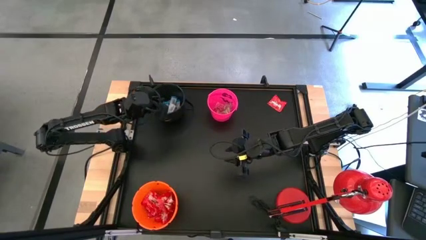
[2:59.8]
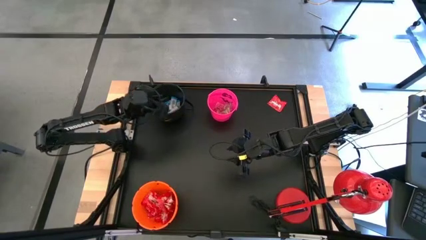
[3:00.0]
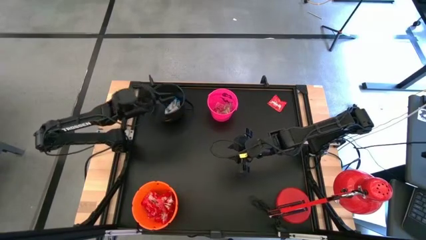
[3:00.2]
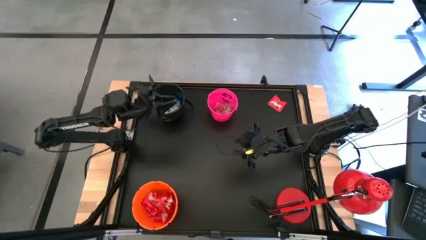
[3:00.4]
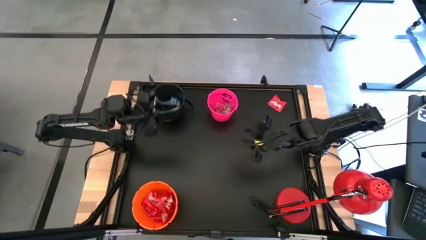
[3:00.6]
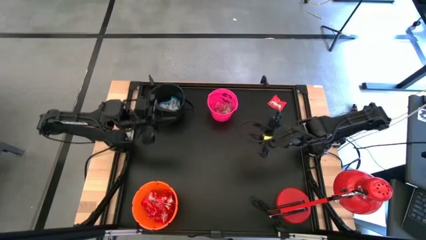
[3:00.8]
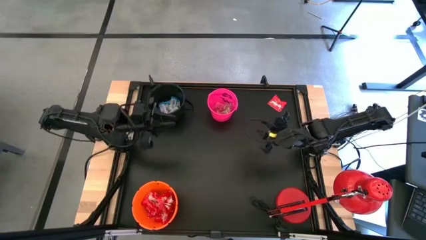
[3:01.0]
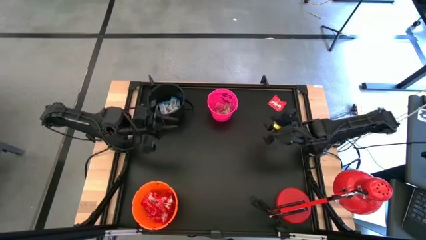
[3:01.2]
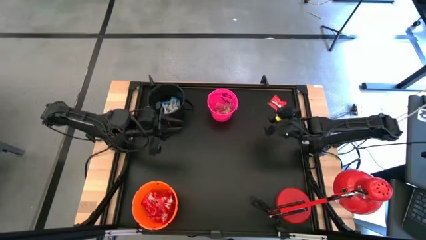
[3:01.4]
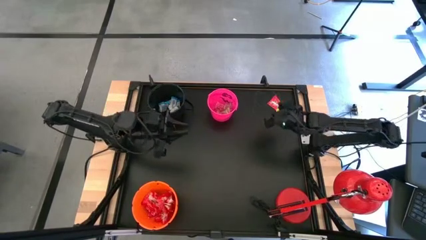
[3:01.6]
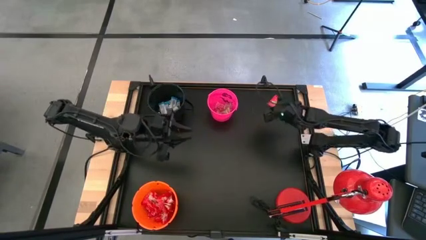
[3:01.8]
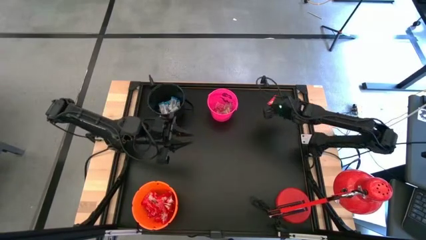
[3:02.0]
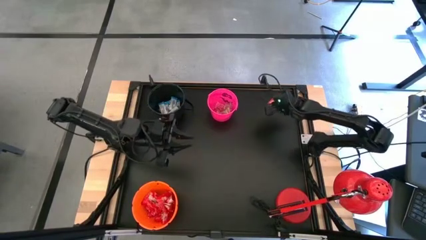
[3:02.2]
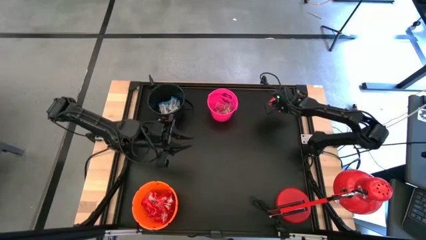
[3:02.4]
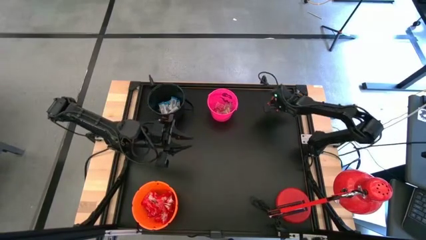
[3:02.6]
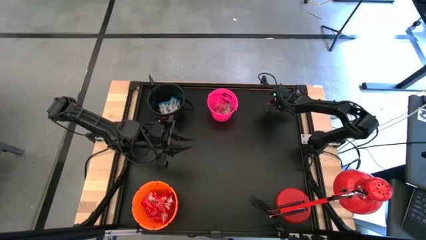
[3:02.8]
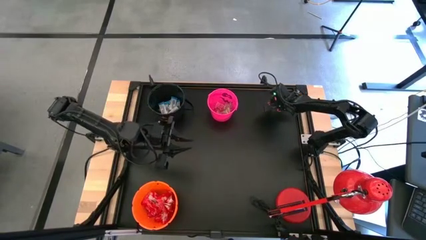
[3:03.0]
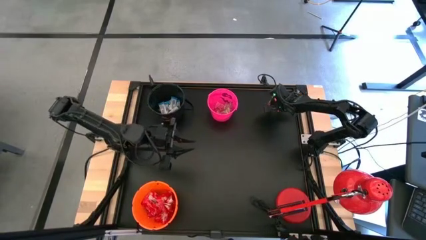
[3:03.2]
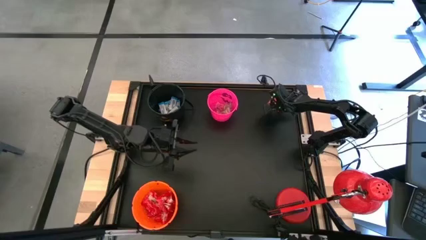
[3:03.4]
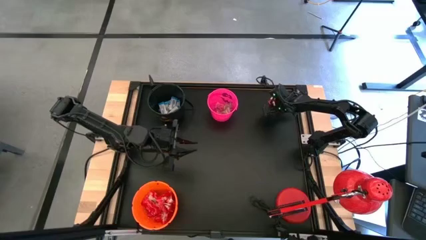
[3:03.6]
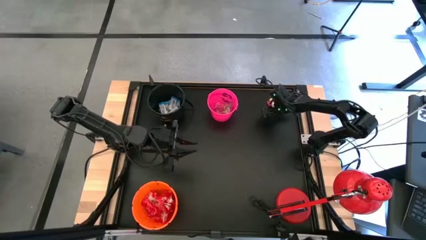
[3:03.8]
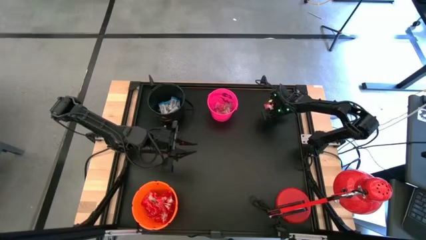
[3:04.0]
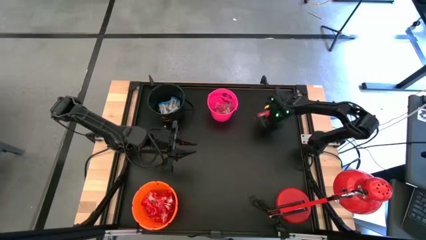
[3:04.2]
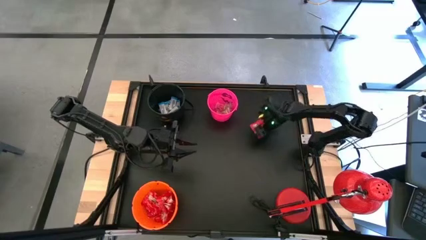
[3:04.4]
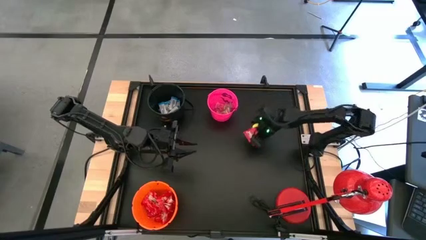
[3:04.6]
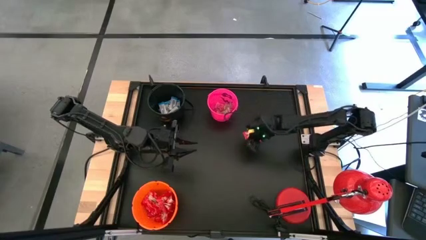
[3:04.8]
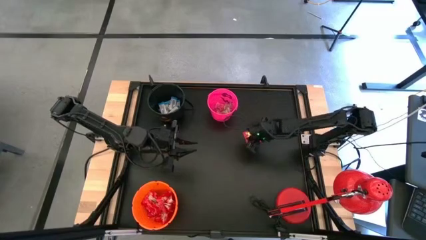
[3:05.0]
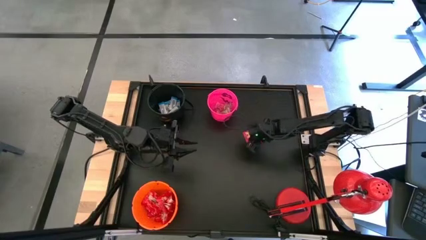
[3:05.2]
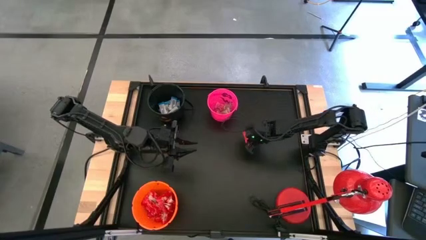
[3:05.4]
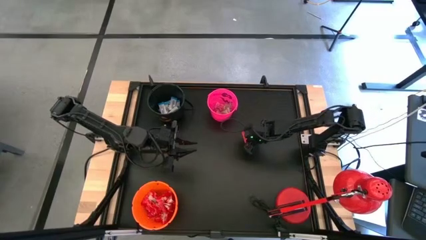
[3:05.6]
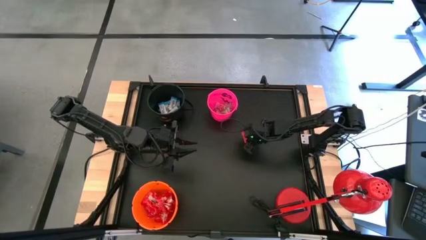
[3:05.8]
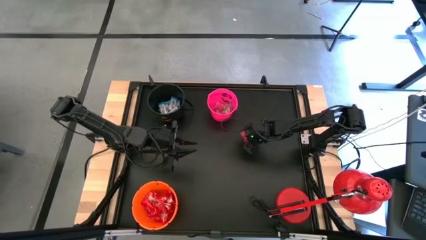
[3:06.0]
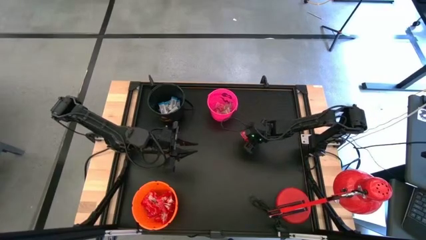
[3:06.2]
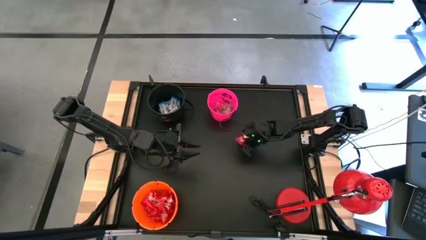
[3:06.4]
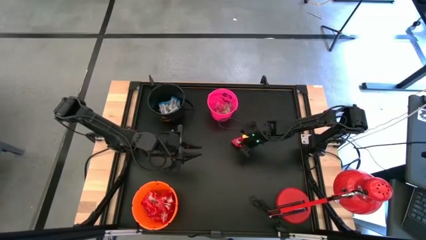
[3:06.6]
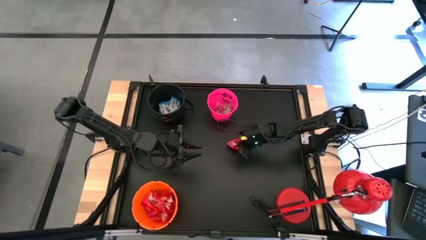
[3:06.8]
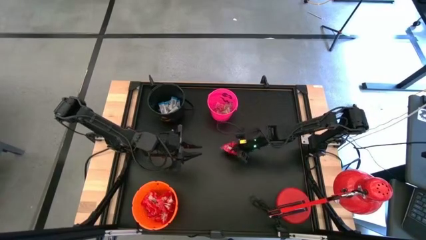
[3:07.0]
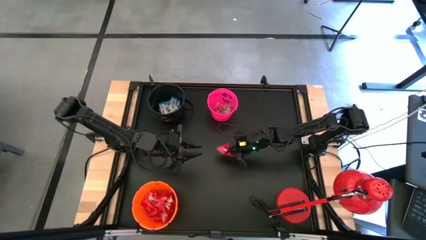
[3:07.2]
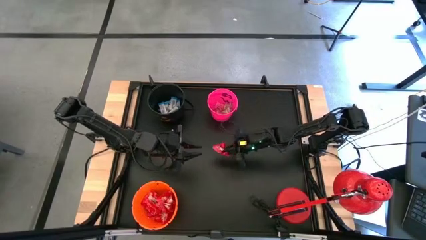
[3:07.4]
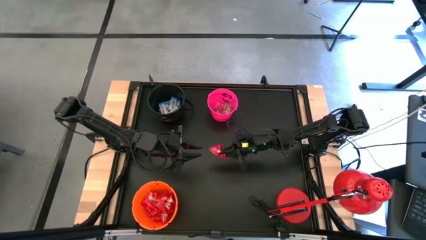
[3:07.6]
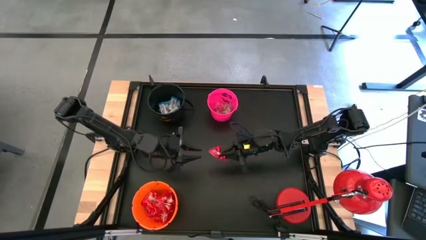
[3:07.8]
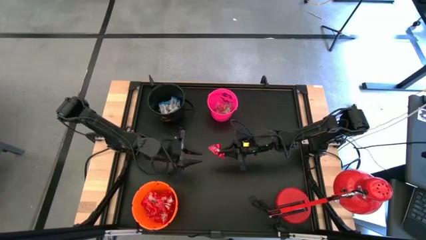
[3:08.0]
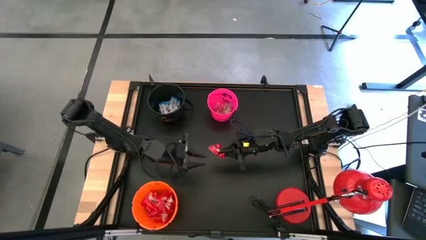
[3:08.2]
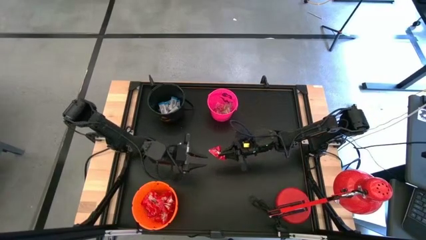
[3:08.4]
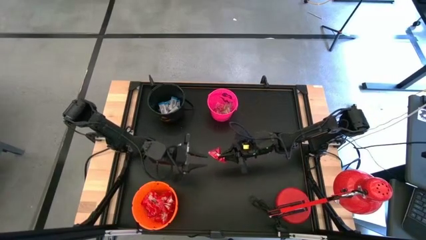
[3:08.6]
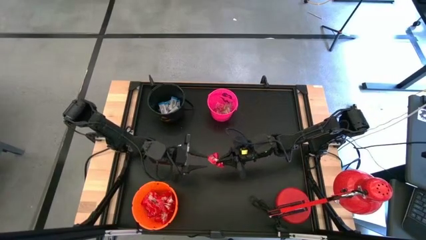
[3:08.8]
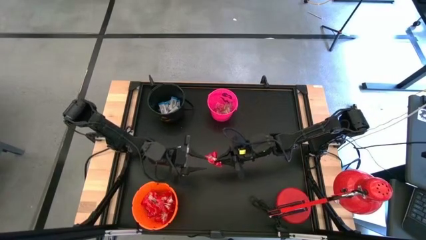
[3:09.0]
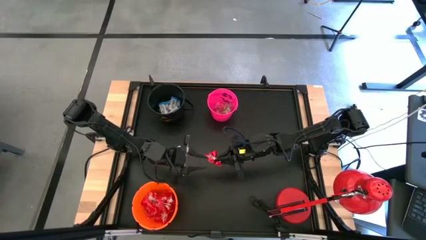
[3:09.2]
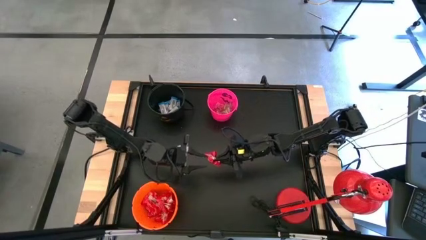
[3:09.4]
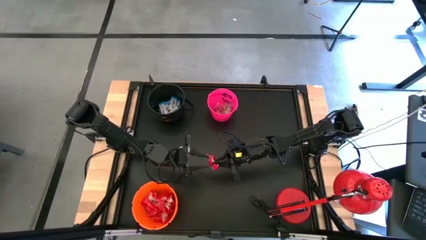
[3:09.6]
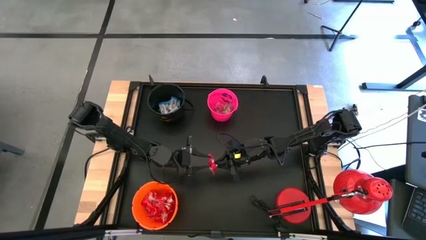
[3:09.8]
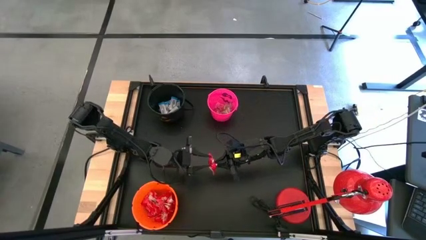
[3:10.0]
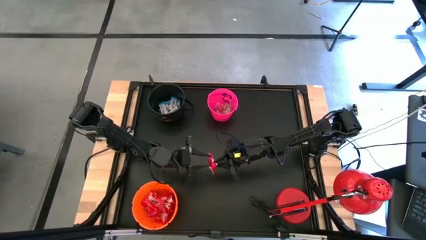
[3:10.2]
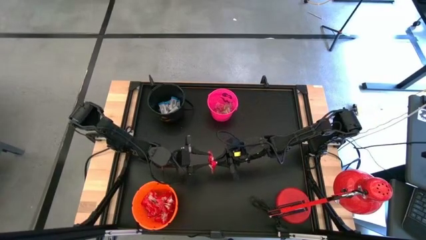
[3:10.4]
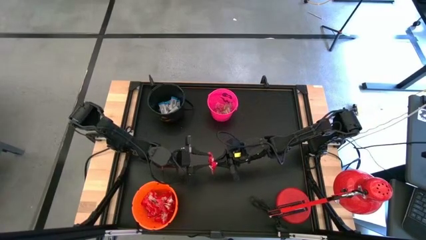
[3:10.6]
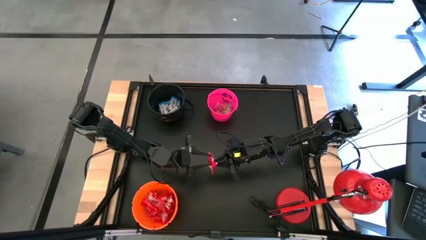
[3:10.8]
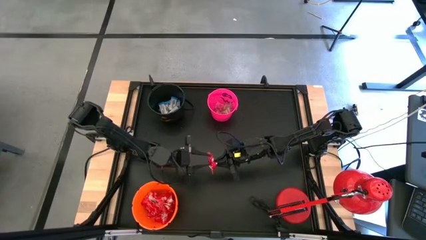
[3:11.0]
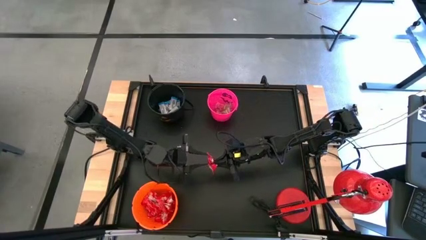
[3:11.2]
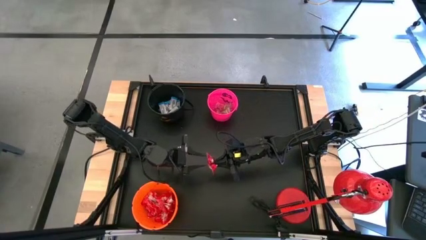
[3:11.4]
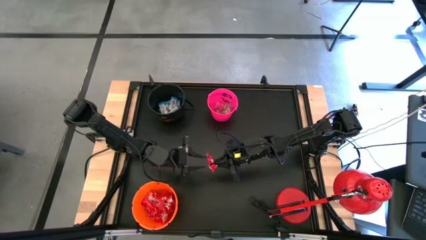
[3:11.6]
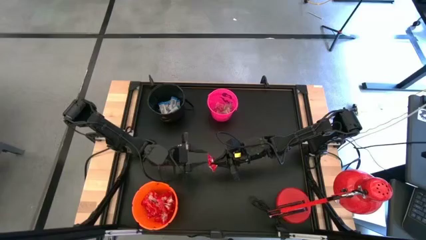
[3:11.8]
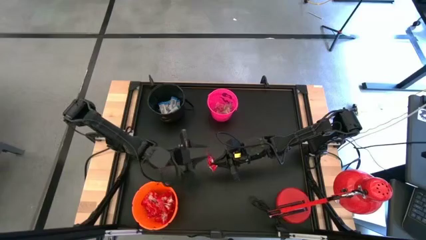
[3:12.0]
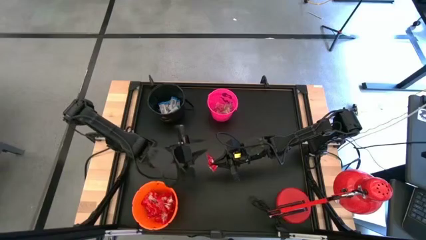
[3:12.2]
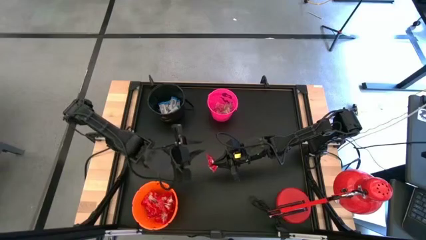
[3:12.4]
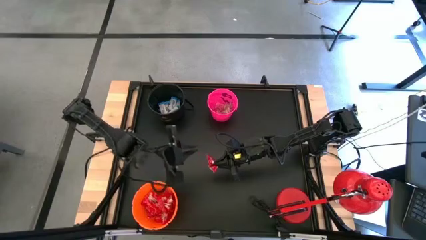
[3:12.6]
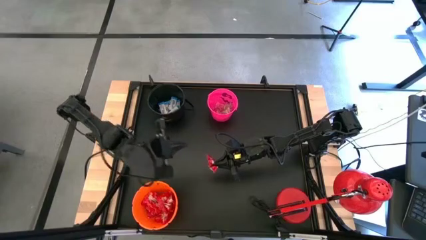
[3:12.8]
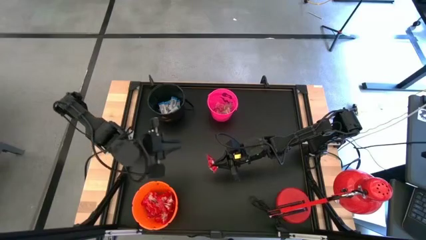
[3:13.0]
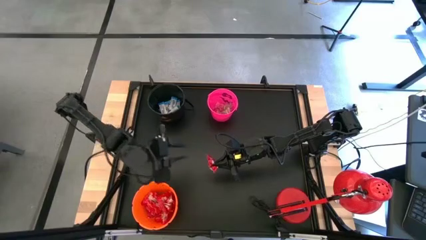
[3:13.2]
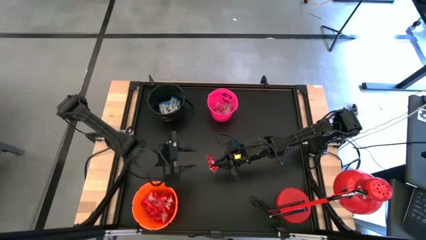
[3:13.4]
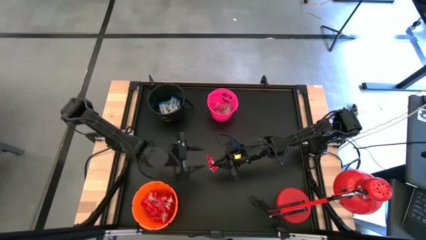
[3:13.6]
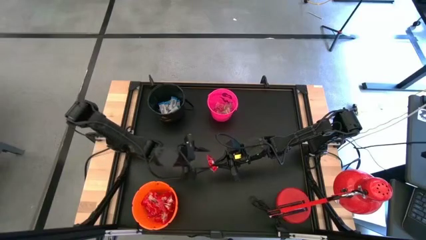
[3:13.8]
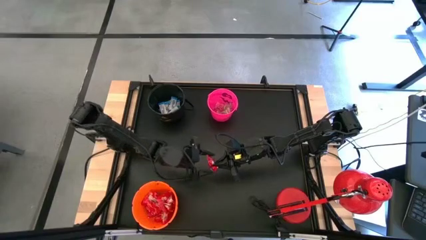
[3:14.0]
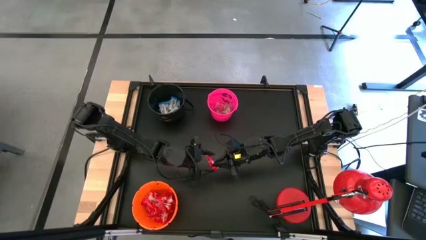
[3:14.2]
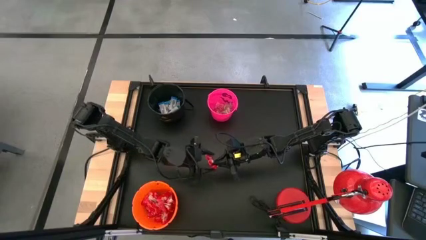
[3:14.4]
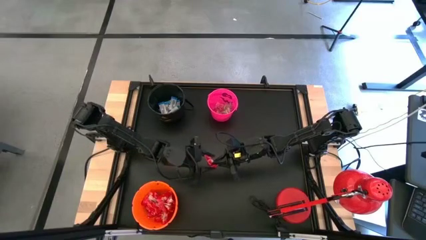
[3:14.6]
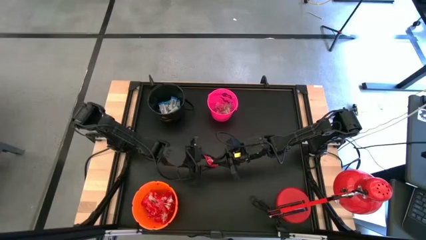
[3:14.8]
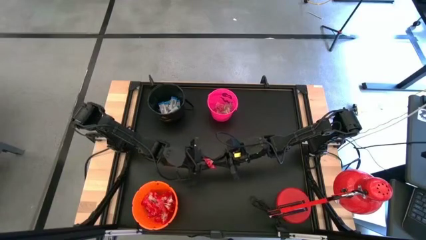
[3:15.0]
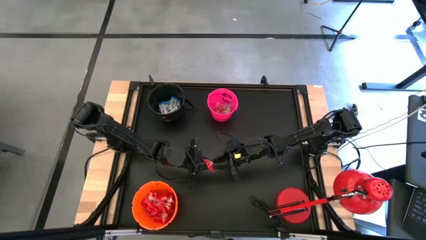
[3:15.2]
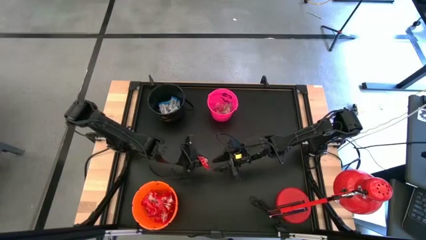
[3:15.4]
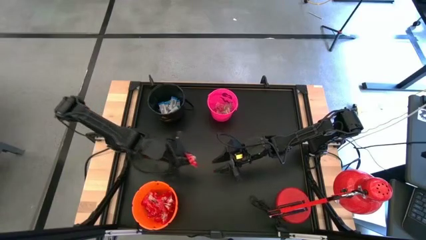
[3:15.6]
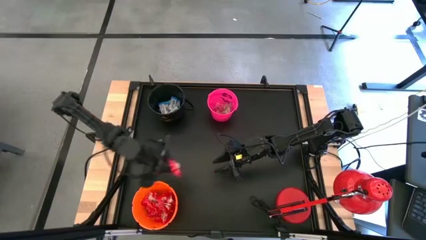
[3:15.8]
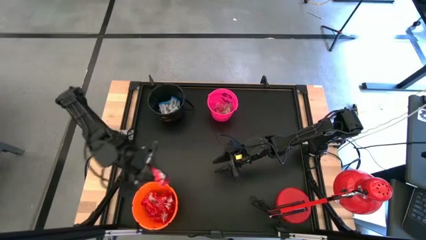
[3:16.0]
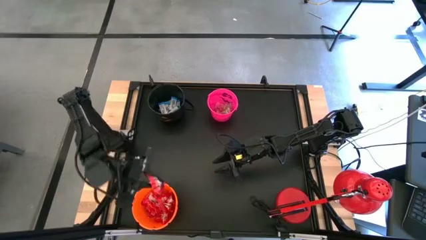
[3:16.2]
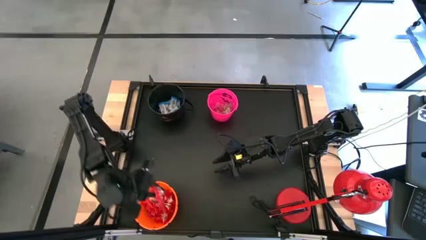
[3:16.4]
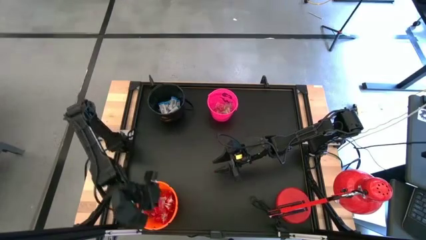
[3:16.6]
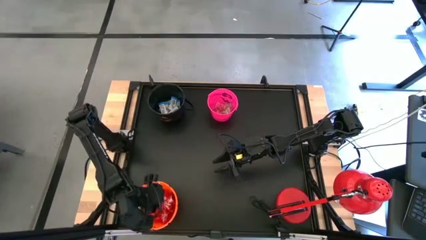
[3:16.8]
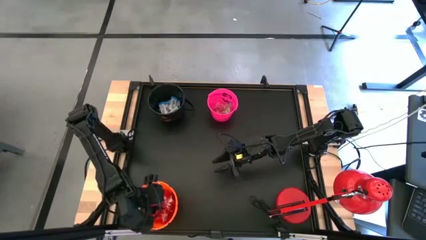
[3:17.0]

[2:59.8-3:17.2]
Task: Organize candy in baskets
Put the red candy into the orange bucket
